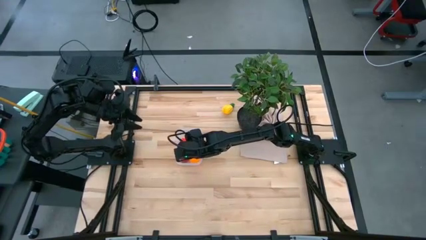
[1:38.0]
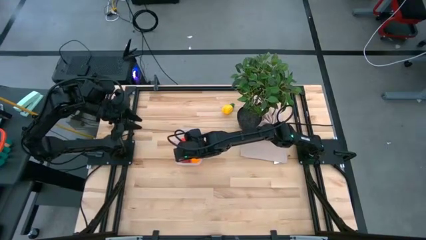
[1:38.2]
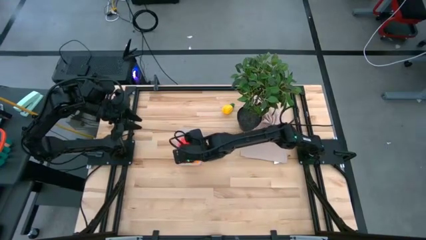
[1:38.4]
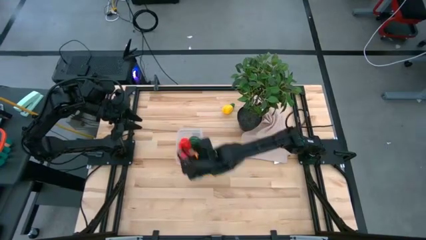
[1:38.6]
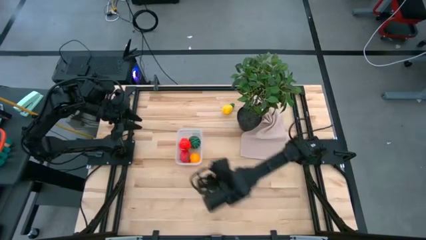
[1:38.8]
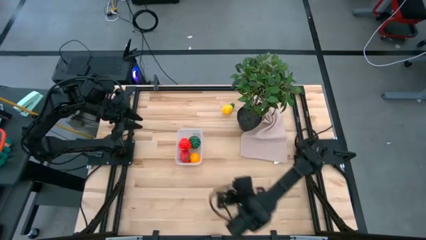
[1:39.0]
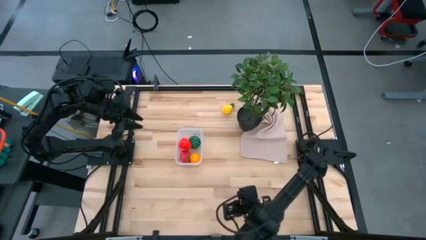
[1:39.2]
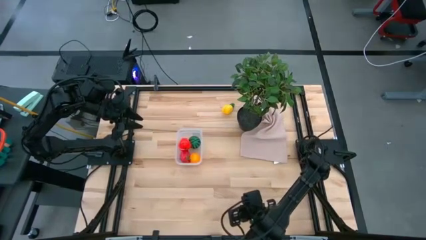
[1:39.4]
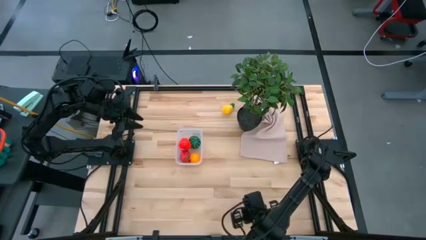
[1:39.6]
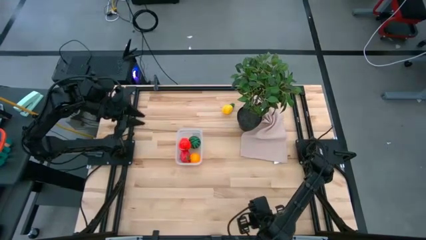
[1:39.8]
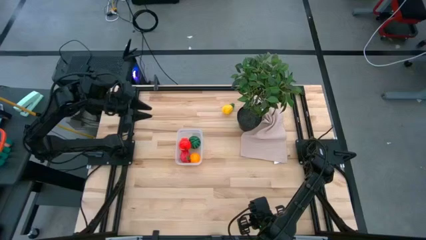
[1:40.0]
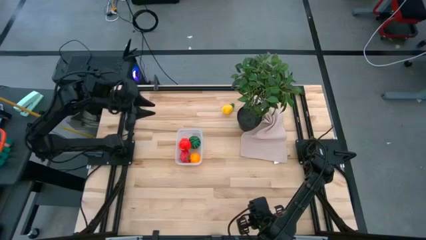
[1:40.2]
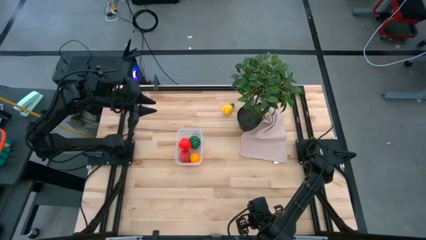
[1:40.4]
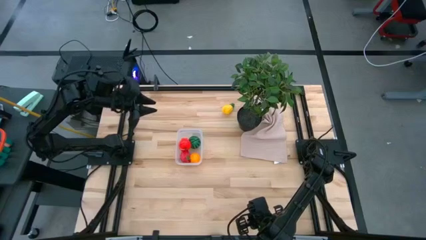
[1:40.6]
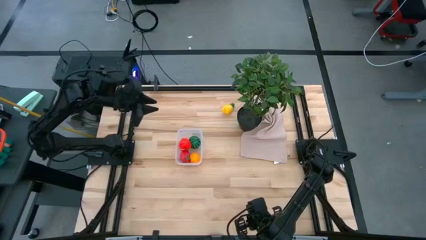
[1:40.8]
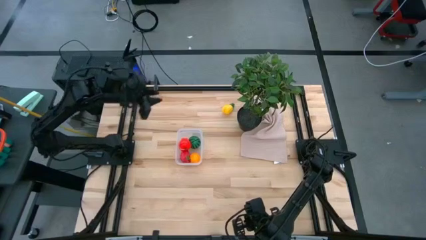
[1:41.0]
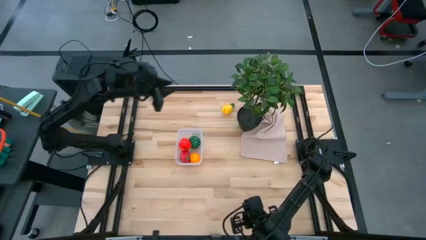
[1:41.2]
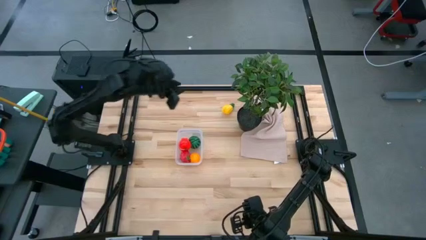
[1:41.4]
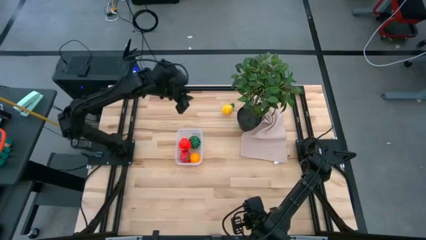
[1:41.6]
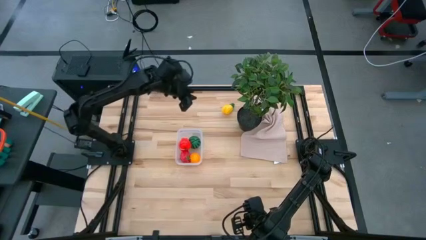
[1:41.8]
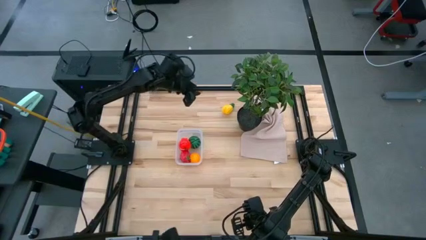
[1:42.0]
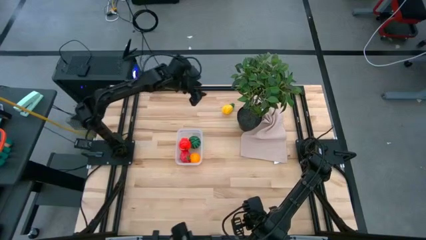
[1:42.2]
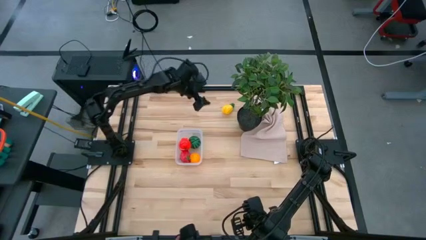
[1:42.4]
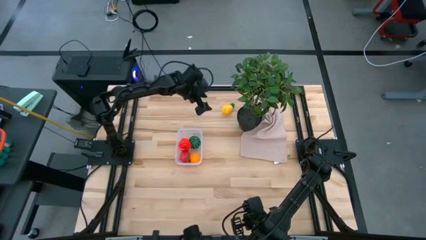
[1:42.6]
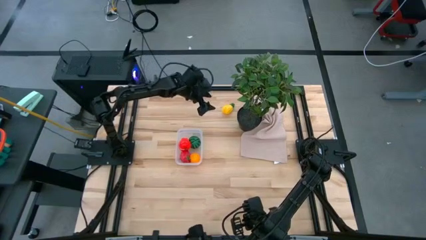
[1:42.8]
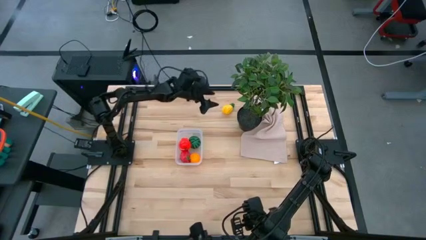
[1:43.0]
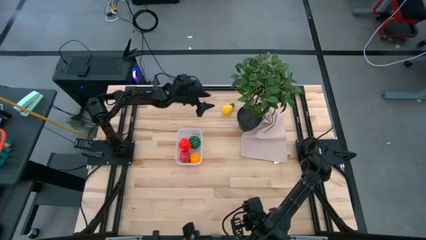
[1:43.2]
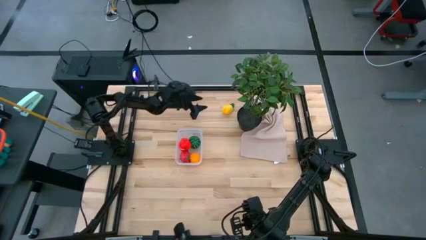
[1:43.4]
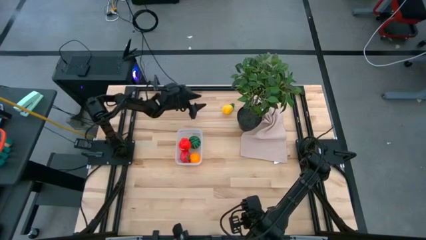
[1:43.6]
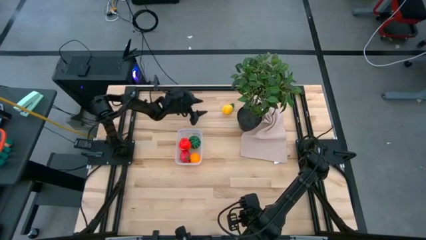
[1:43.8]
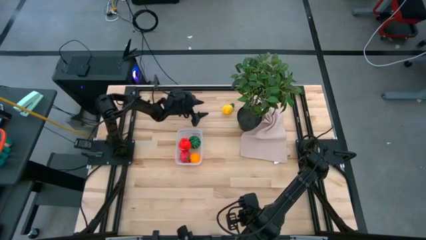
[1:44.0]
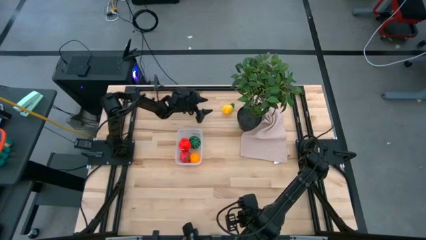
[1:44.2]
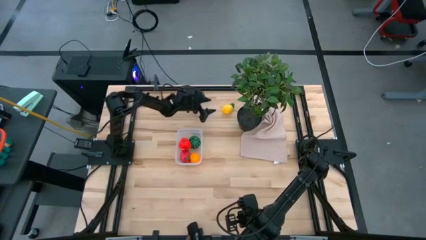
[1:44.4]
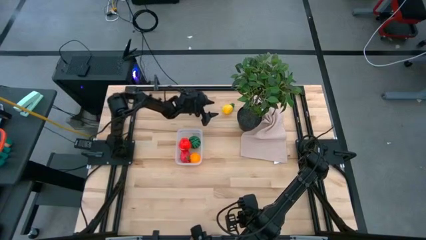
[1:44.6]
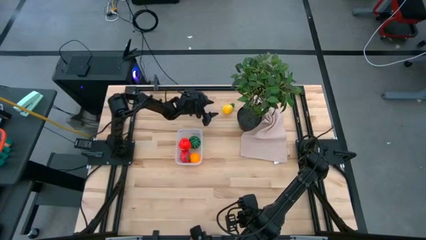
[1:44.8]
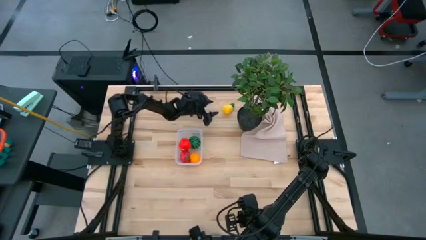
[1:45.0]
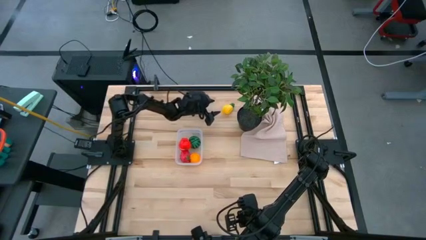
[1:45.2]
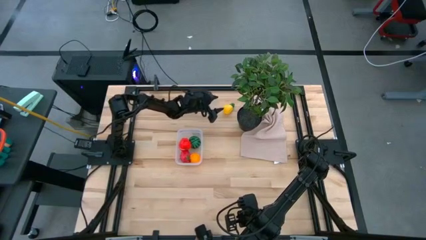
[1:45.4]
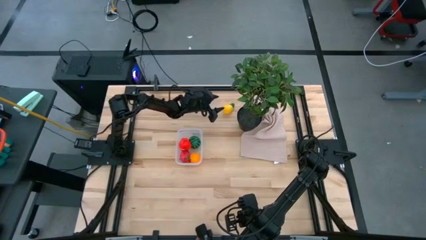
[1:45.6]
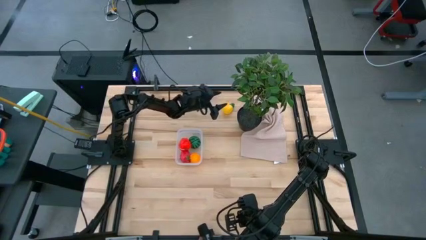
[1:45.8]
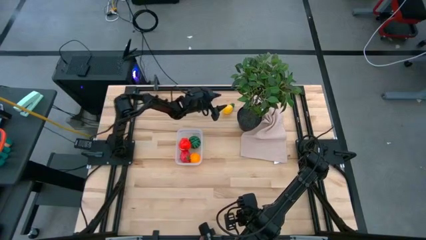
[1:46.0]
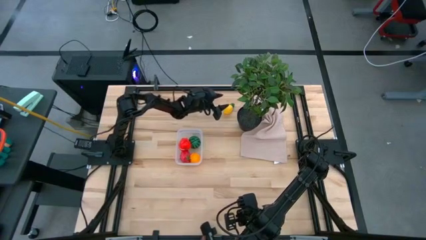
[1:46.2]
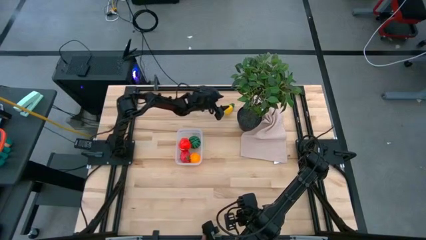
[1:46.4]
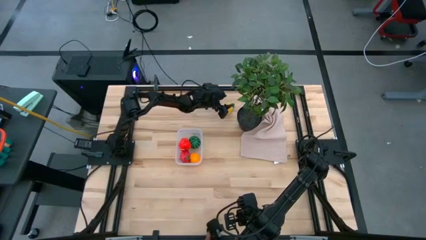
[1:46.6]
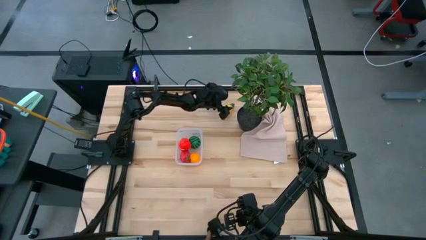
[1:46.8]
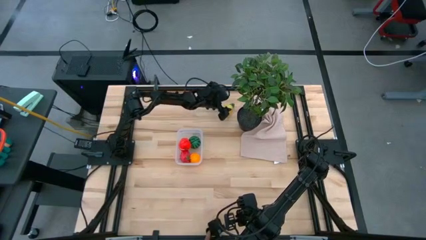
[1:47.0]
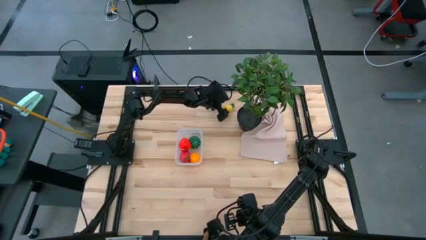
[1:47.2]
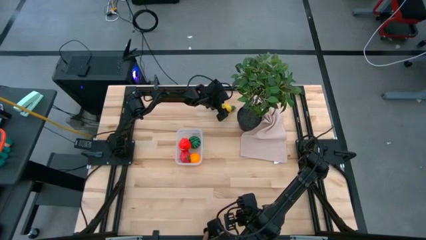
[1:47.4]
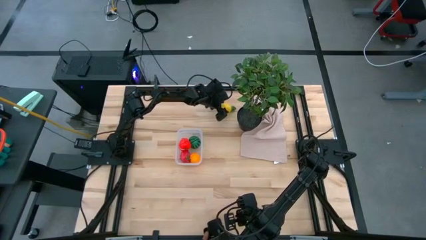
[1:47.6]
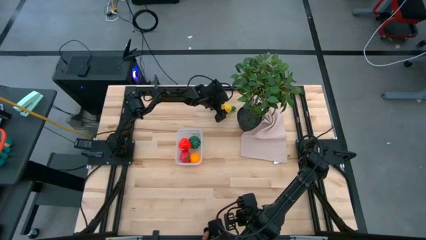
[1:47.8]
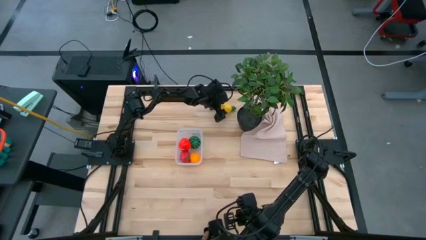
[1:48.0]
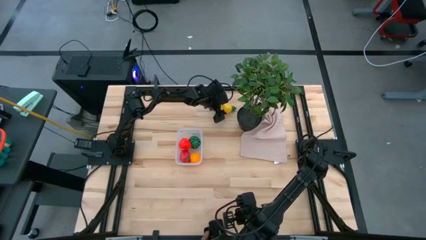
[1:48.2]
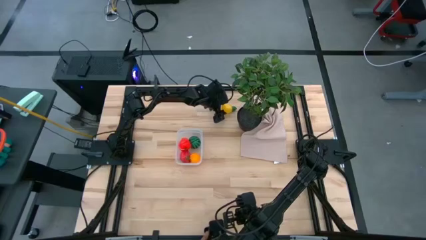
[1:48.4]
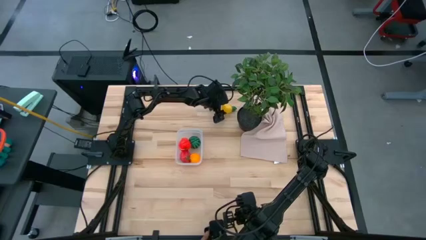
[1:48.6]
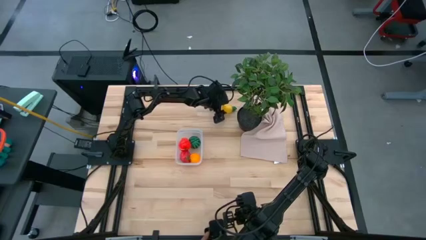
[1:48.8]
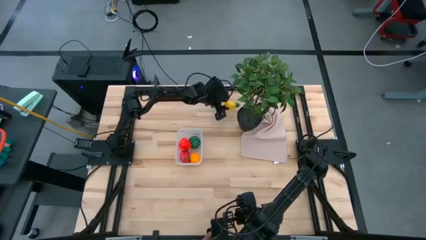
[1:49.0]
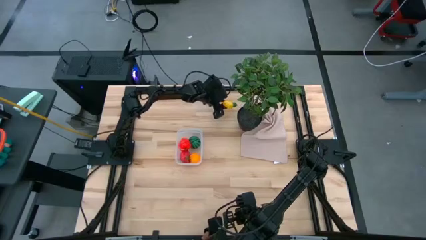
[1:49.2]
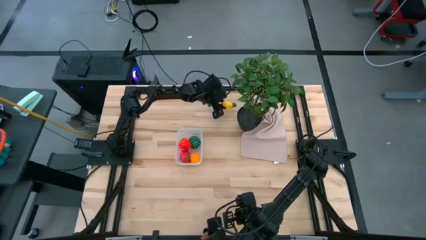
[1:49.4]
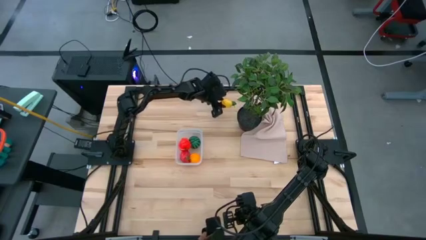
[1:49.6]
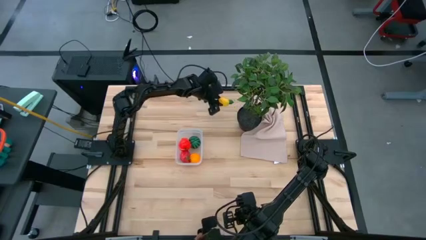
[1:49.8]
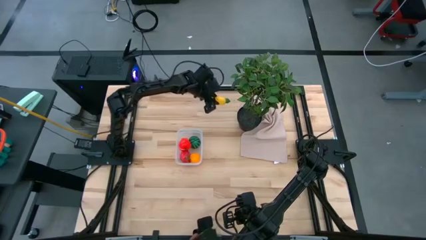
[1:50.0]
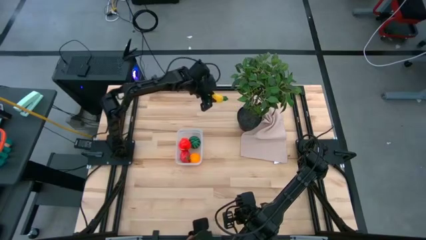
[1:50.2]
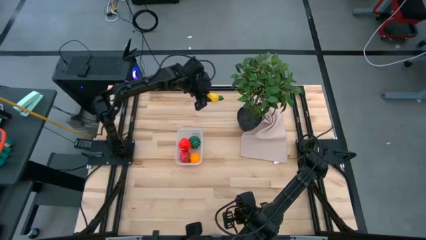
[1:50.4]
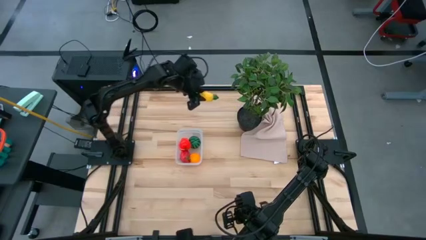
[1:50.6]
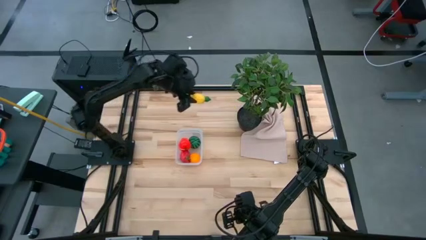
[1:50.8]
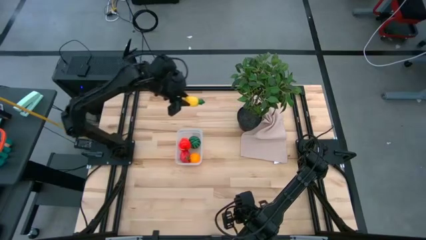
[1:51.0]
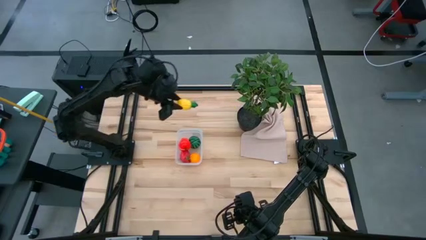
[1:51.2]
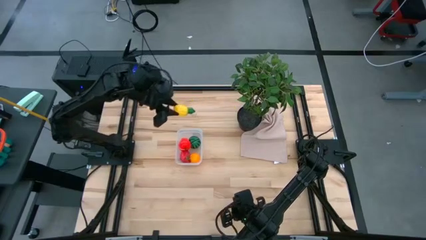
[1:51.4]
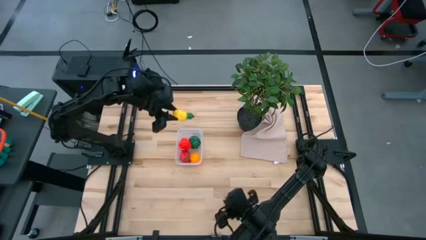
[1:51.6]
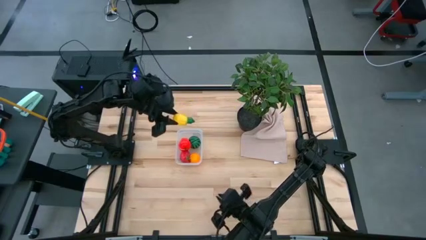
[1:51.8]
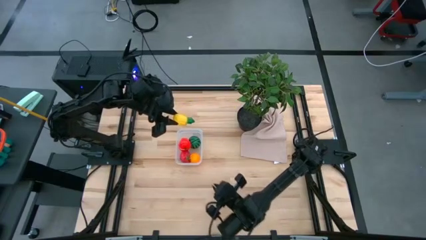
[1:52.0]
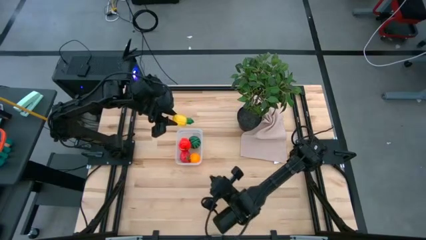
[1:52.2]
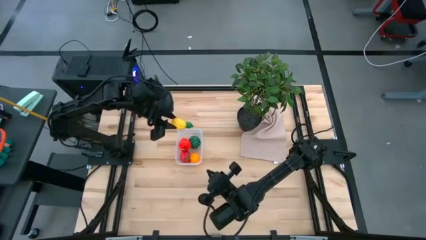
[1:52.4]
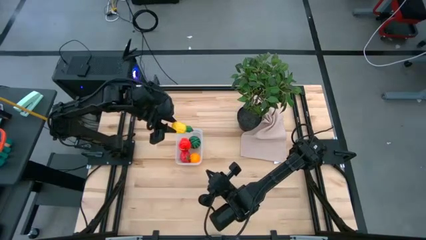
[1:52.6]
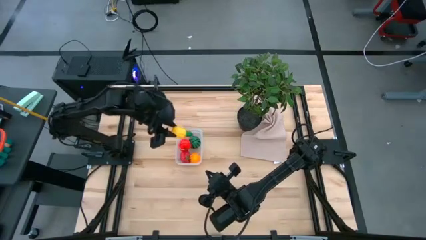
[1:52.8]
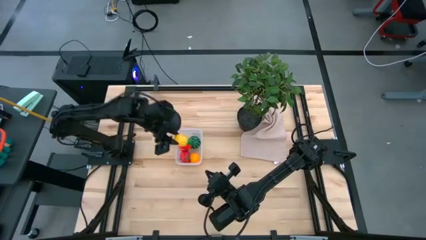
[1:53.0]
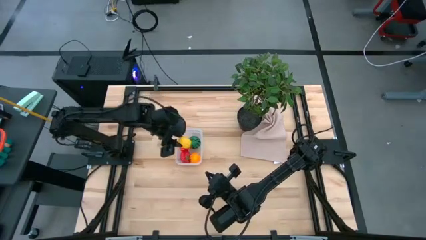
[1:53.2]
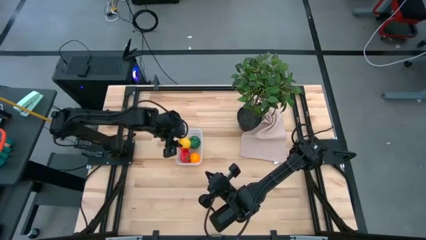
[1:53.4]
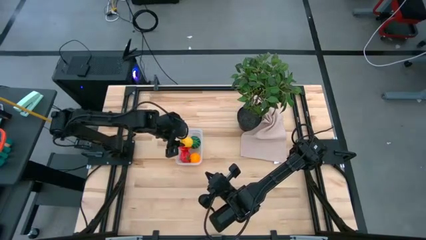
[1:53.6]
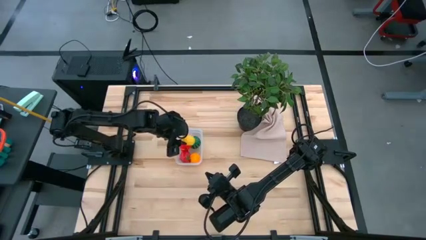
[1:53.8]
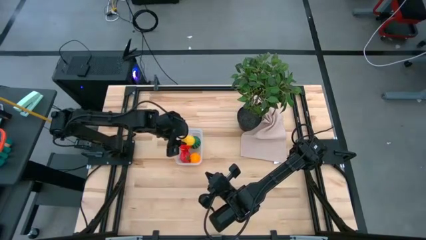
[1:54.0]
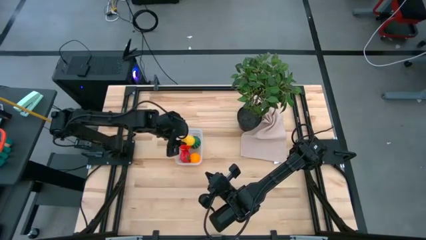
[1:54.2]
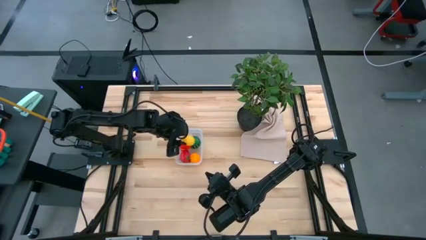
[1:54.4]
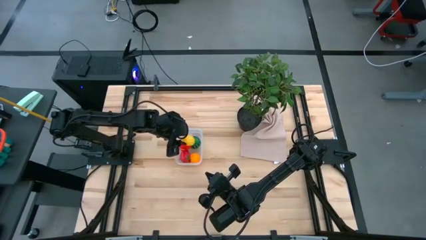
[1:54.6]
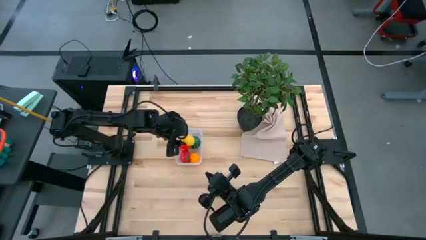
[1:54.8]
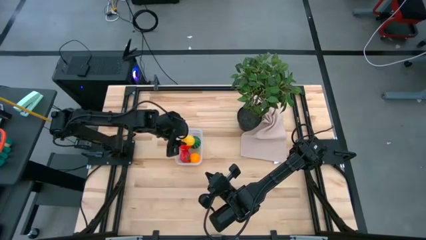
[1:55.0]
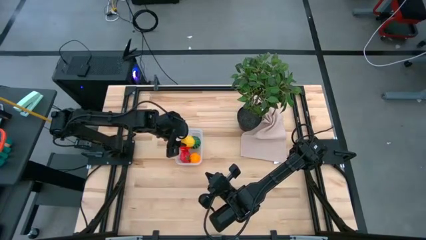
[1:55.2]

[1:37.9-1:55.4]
Task: Pick and placing Produce into tupperware
Put the yellow pineapple into the transparent bin
